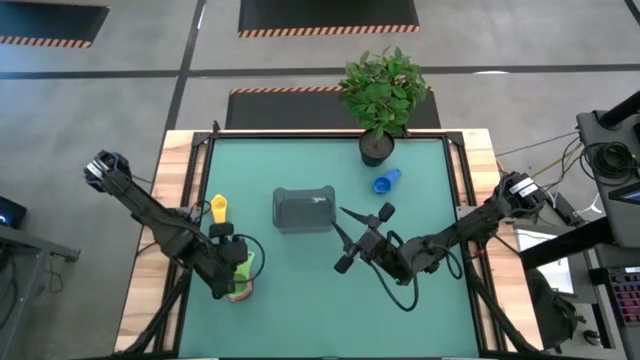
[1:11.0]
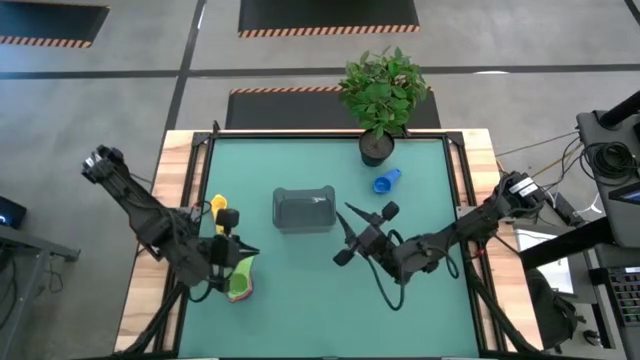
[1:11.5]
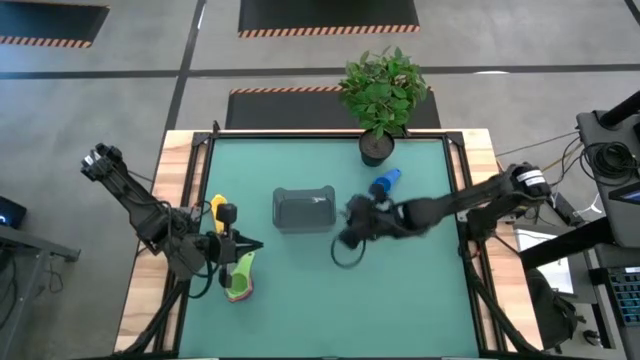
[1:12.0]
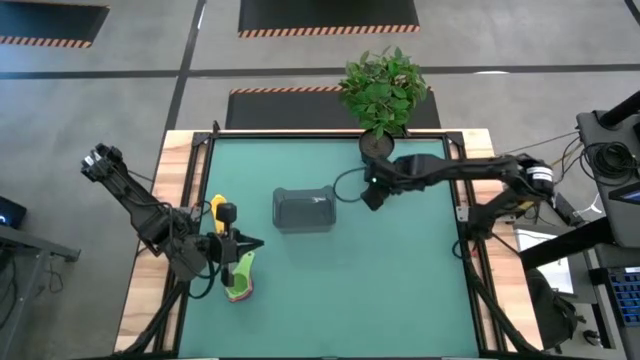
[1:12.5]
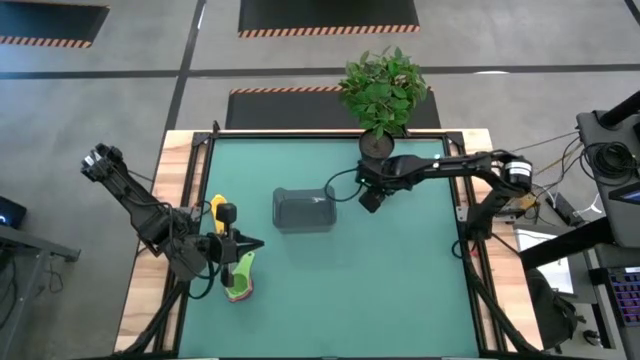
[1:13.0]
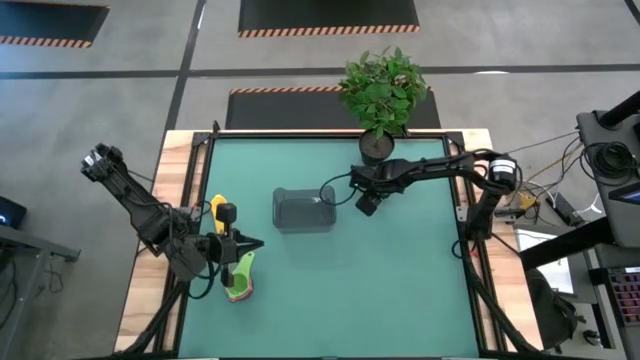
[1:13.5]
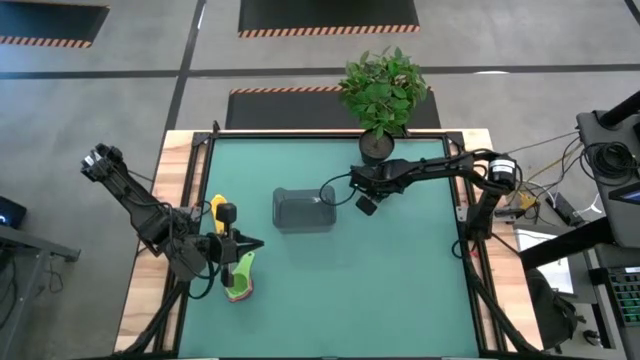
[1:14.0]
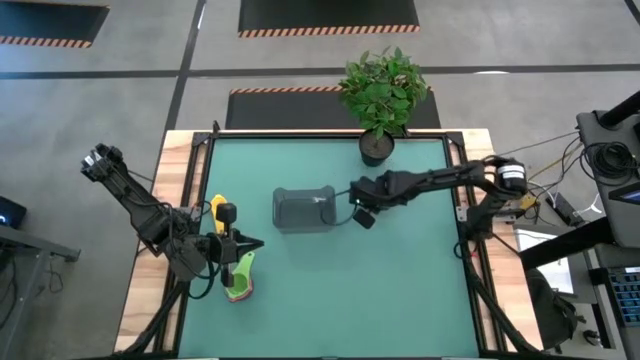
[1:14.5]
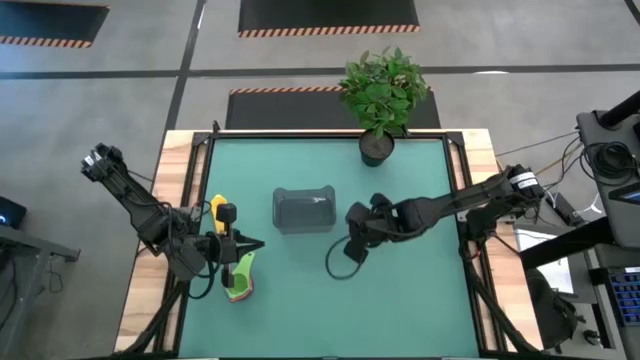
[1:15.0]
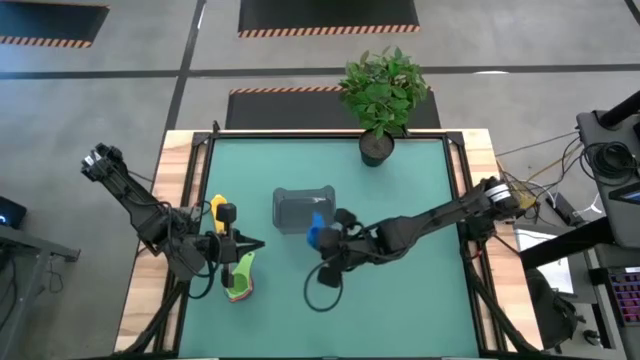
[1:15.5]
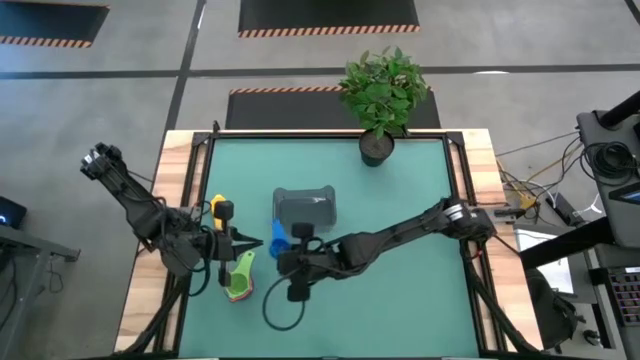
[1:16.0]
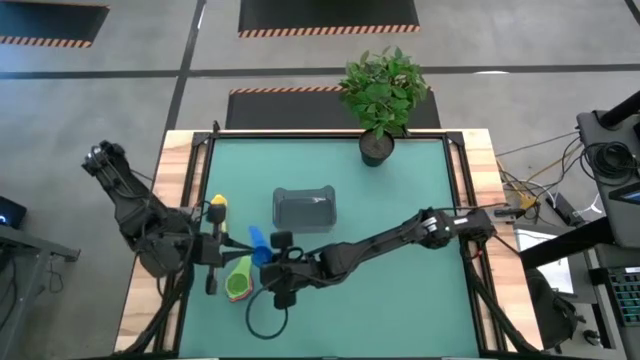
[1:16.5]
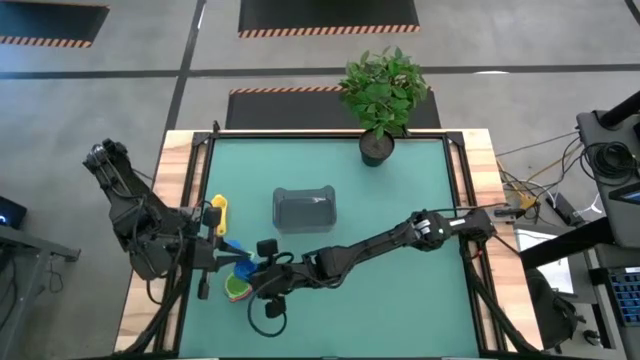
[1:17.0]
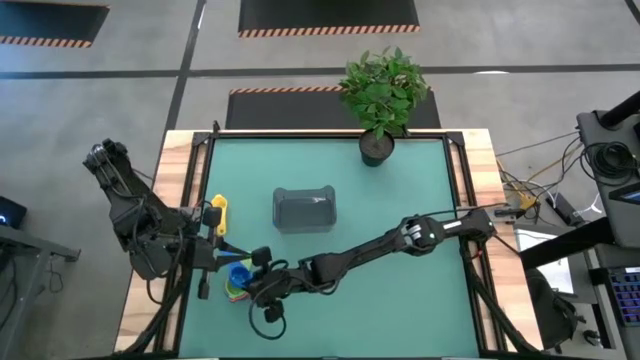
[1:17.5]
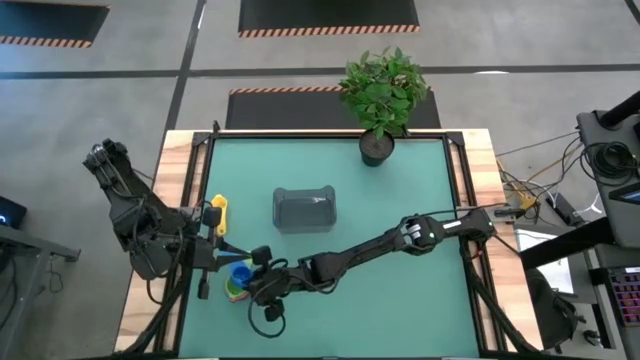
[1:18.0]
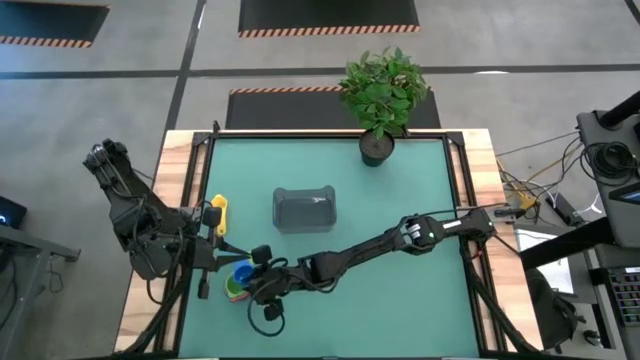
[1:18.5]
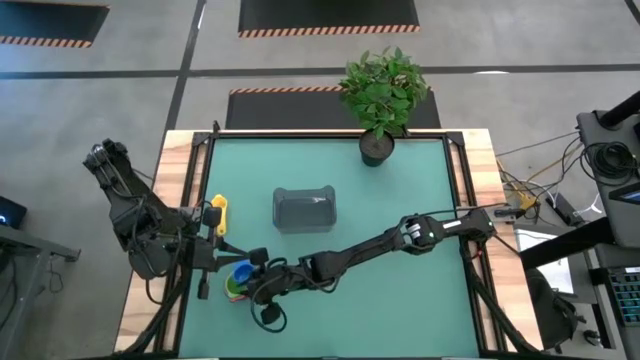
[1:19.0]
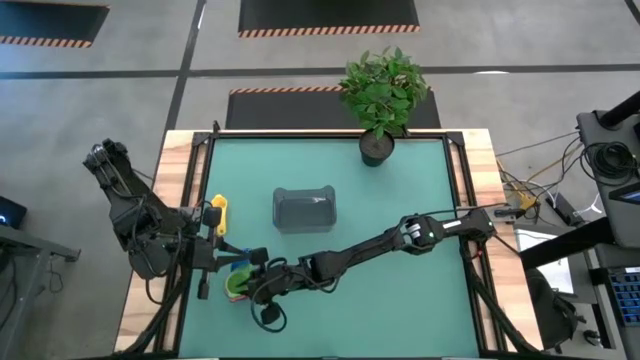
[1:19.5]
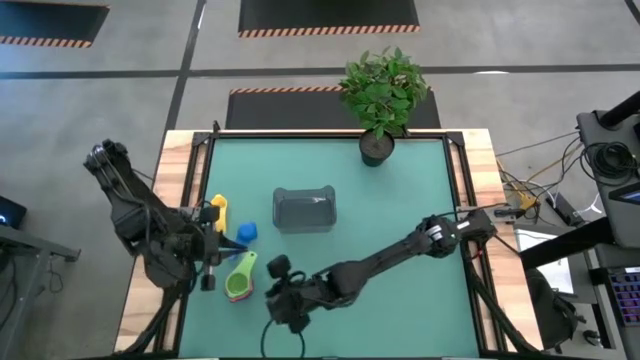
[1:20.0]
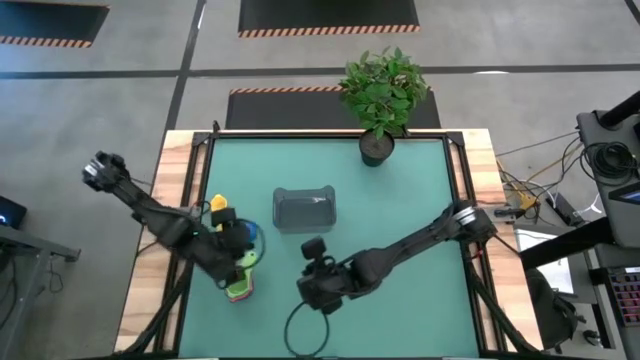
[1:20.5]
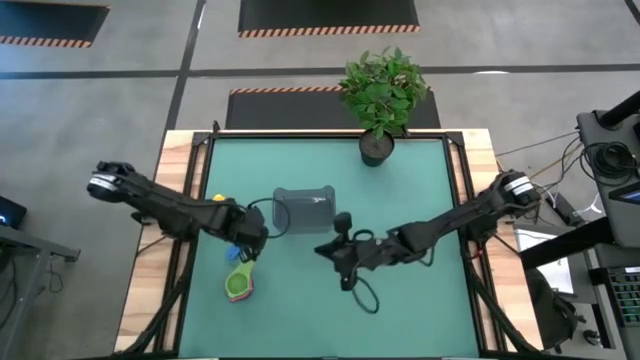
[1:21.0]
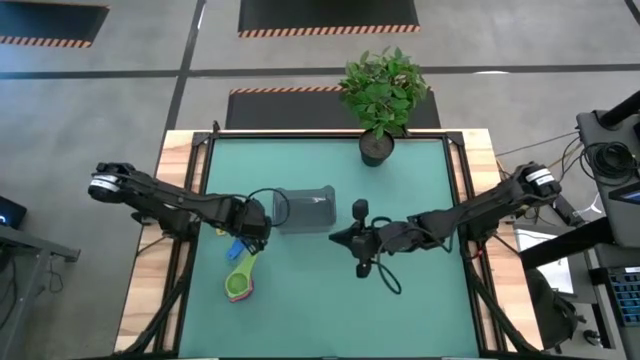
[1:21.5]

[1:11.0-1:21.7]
Task: Nest measuring cups in basket
Stack the blue measuring cup on top of the green measuring cup

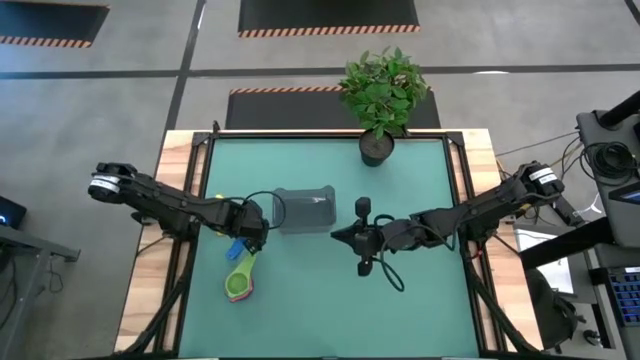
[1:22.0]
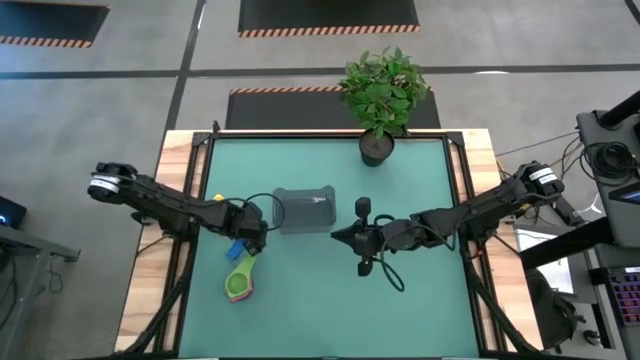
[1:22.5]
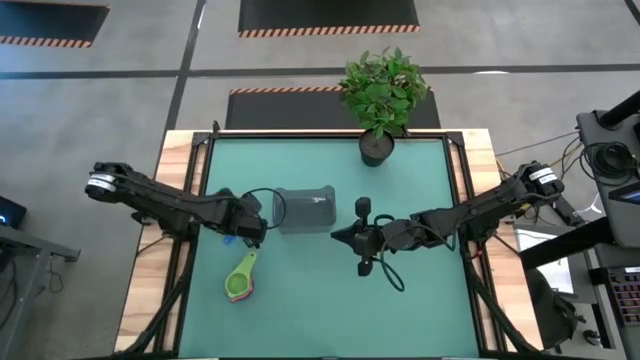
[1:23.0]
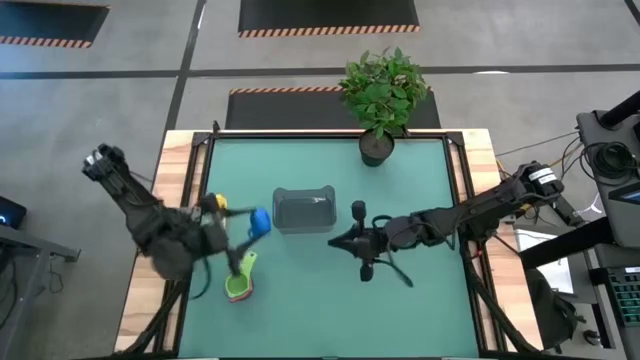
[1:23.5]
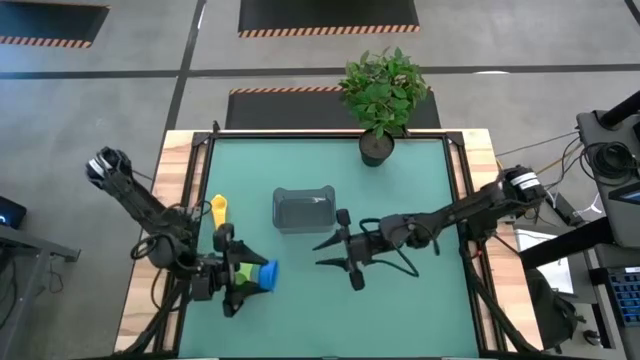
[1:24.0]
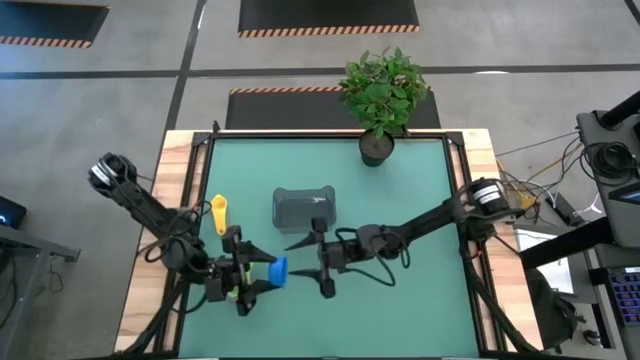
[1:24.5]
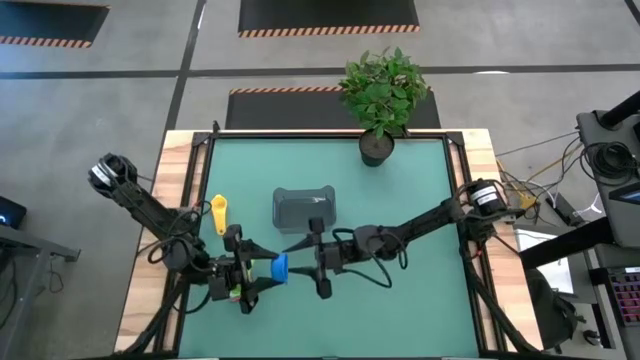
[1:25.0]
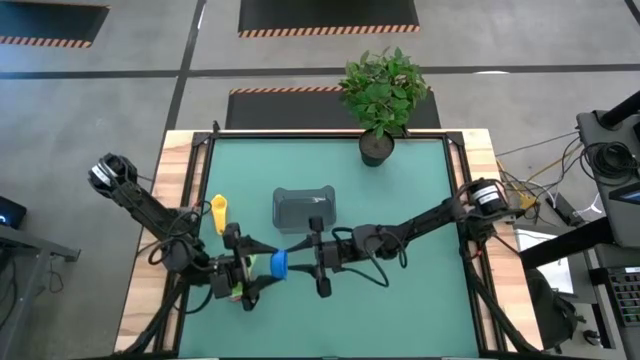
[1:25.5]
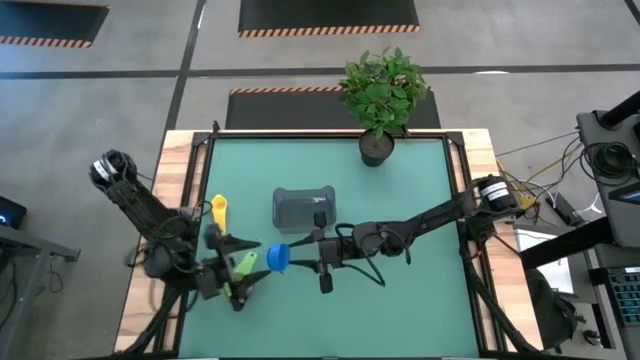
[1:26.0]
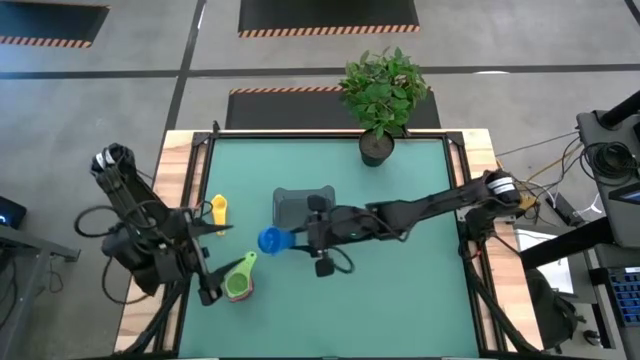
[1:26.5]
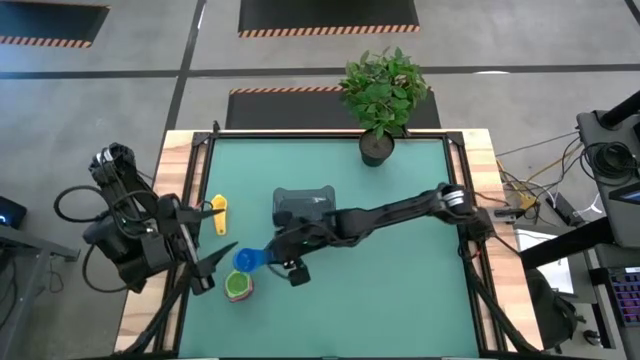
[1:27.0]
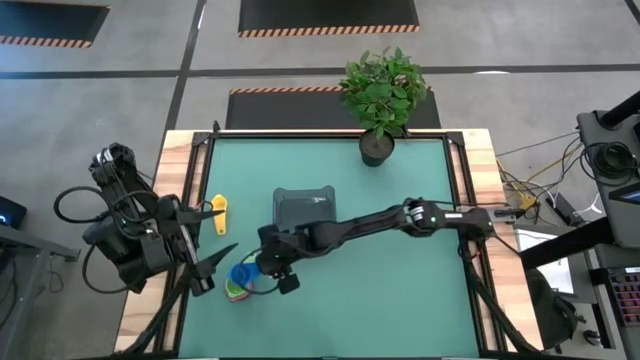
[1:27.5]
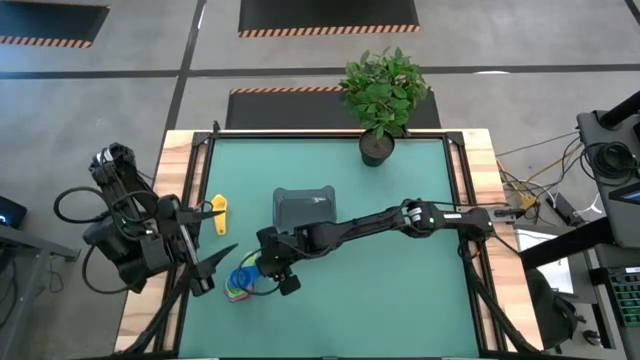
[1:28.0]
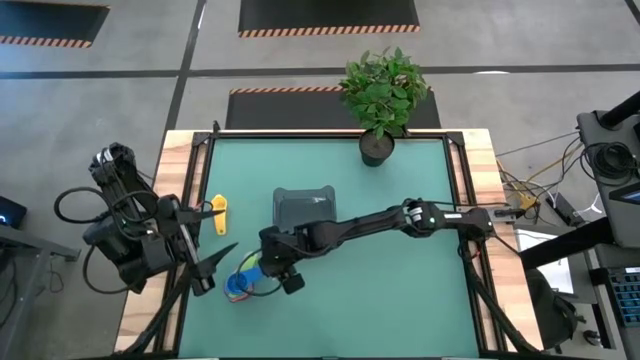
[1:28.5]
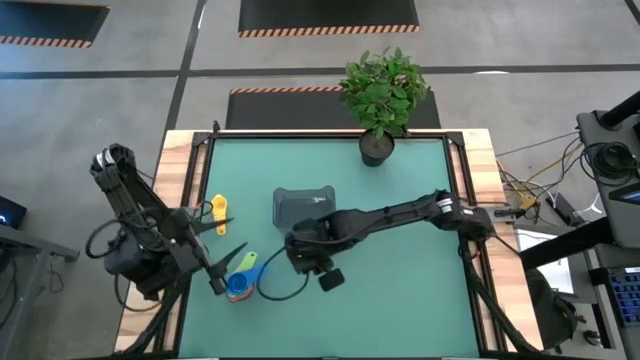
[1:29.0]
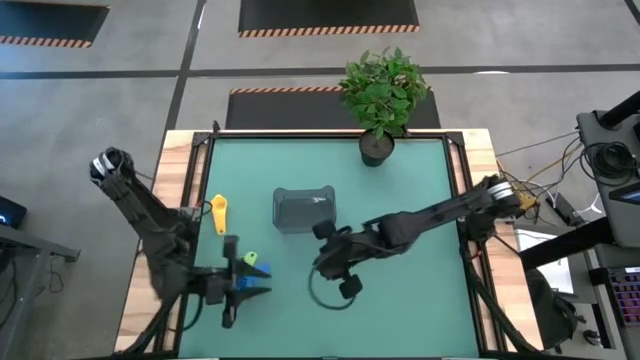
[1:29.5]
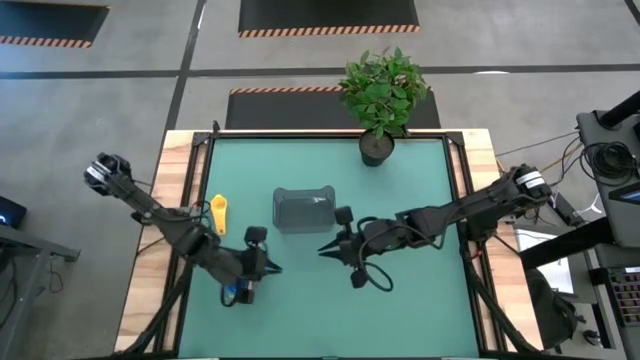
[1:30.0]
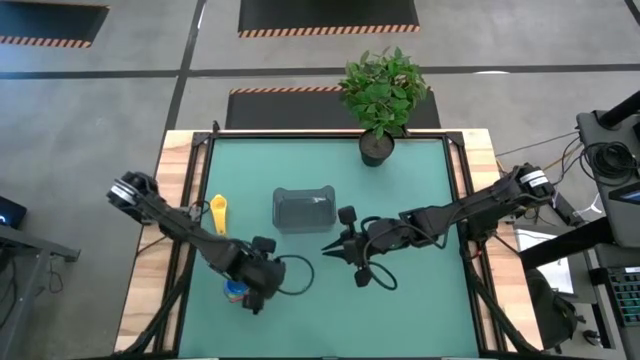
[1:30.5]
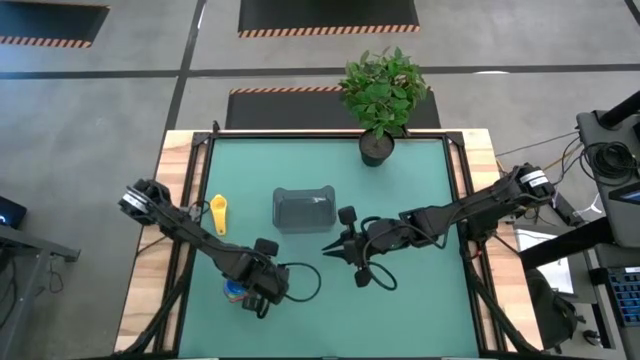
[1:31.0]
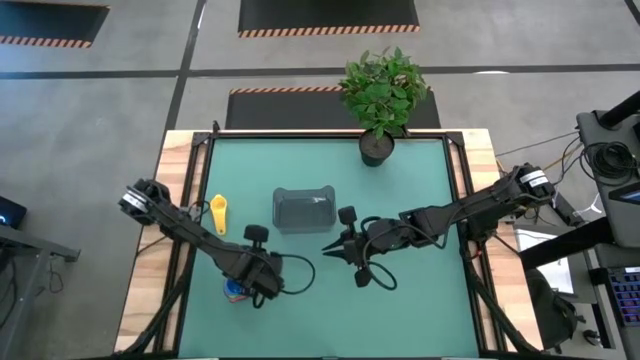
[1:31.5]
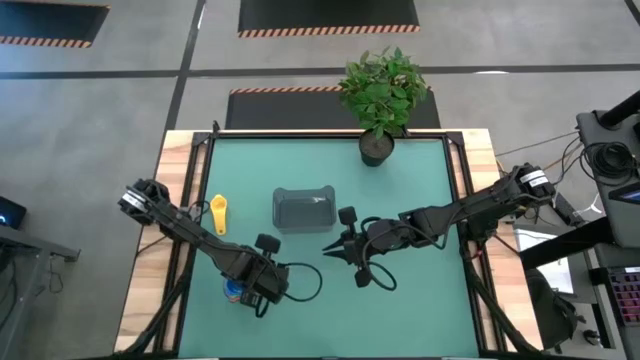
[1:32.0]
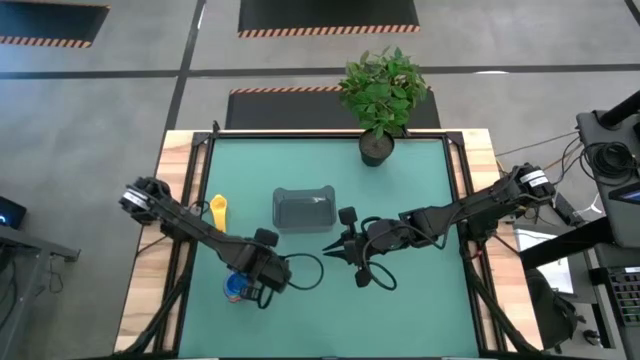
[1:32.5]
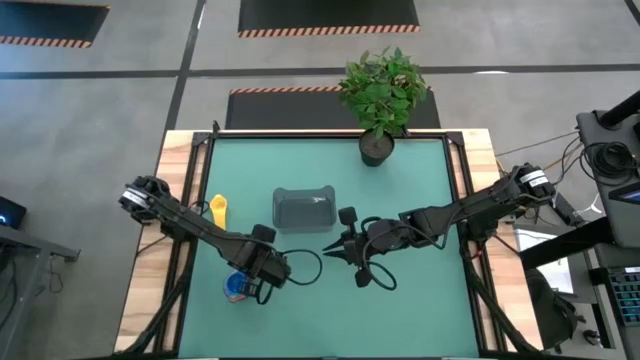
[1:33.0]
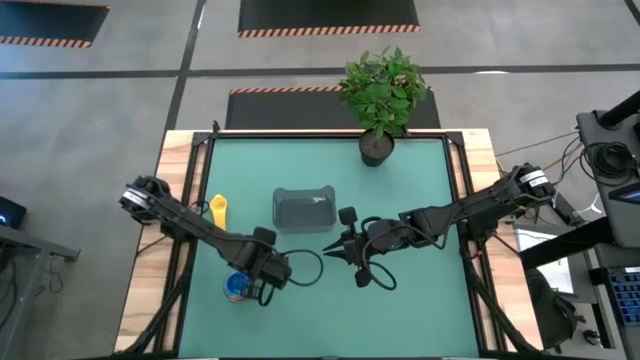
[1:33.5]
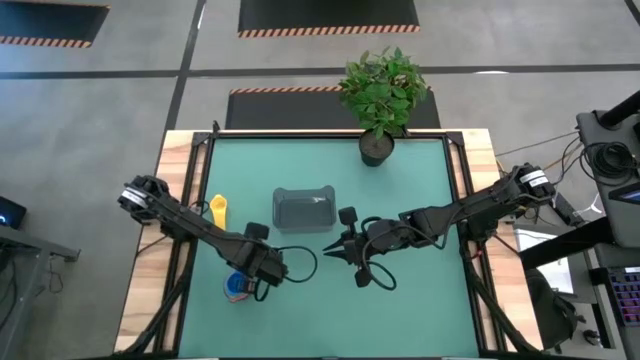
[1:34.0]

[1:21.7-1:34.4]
Stack the blue measuring cup on top of the green measuring cup
